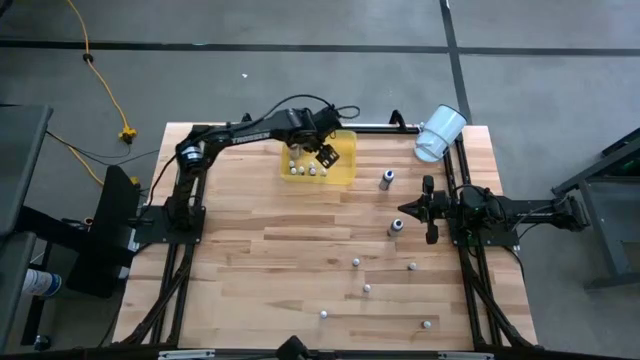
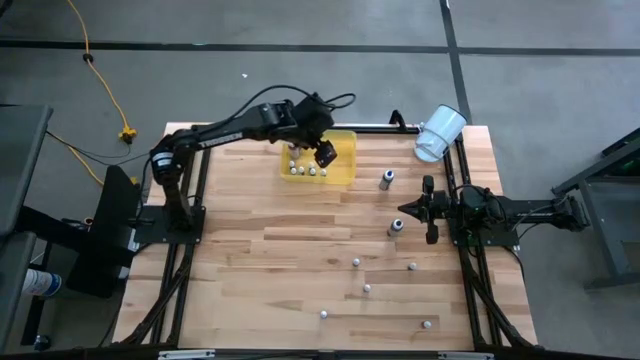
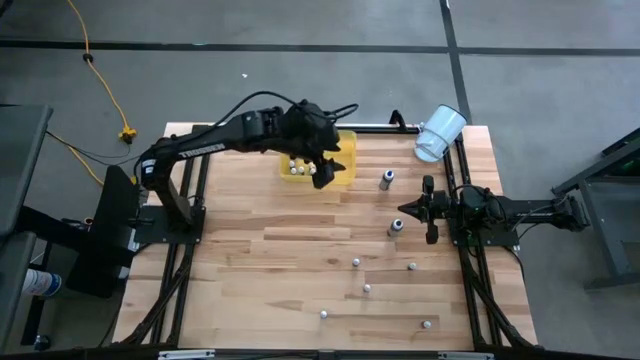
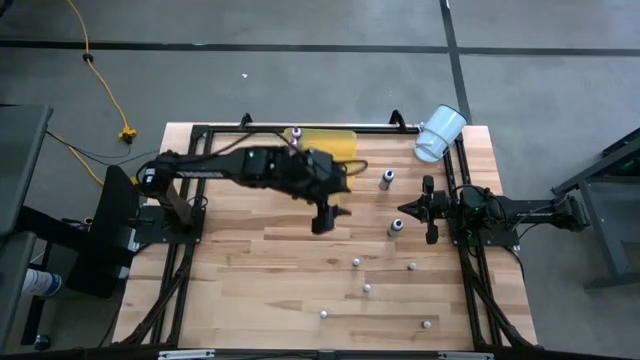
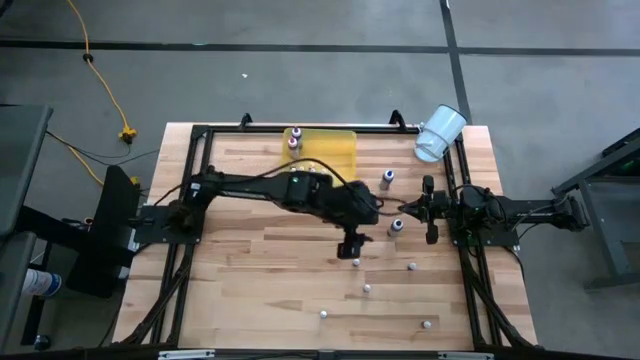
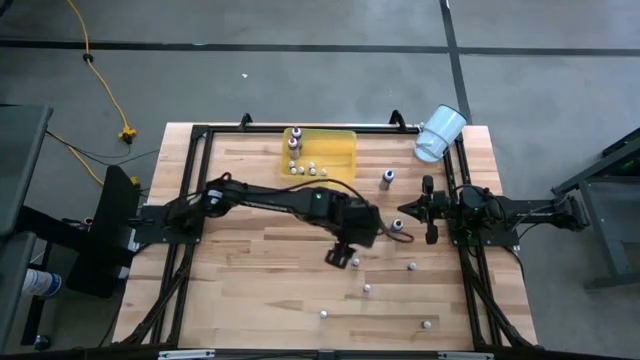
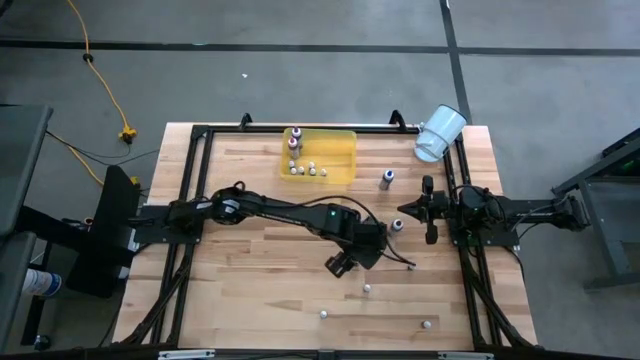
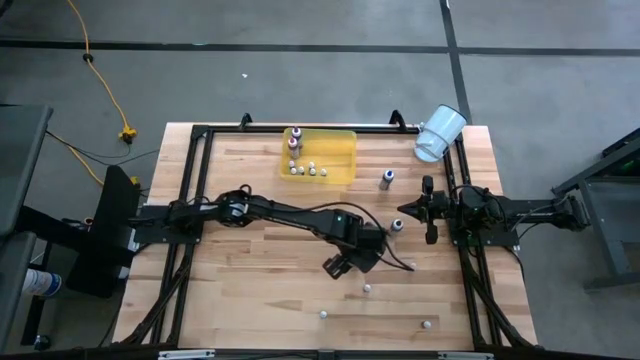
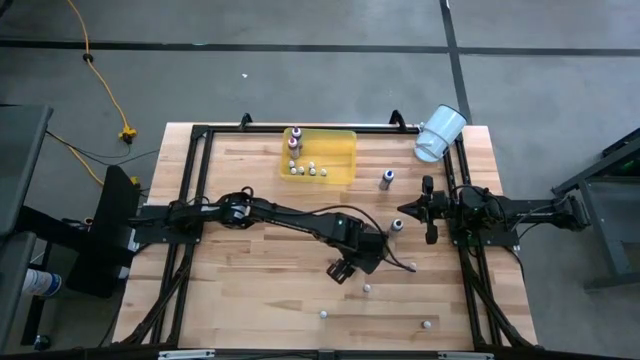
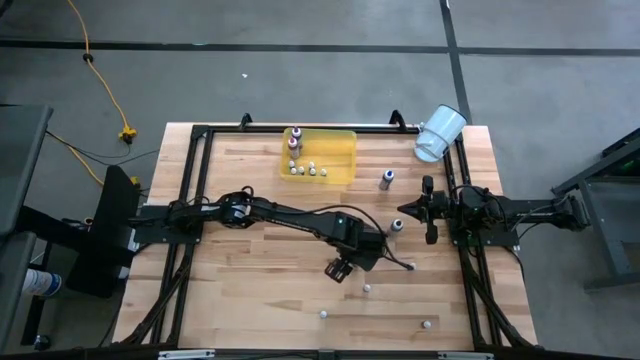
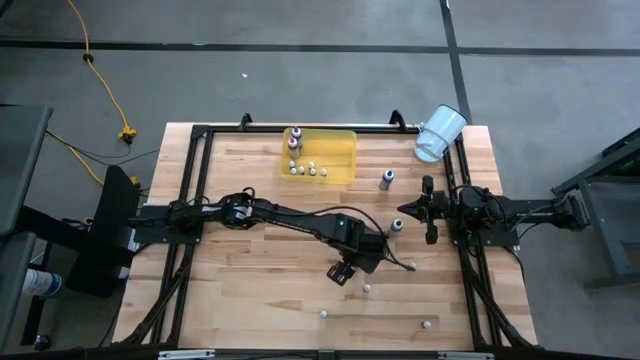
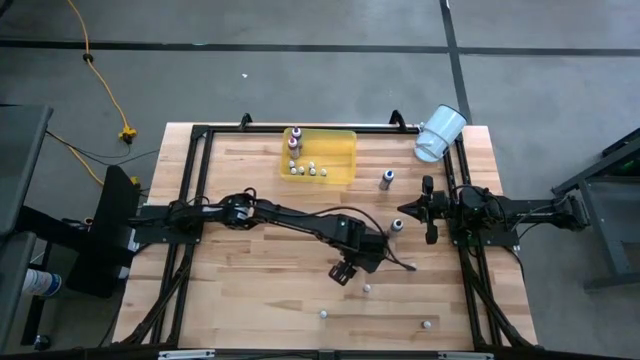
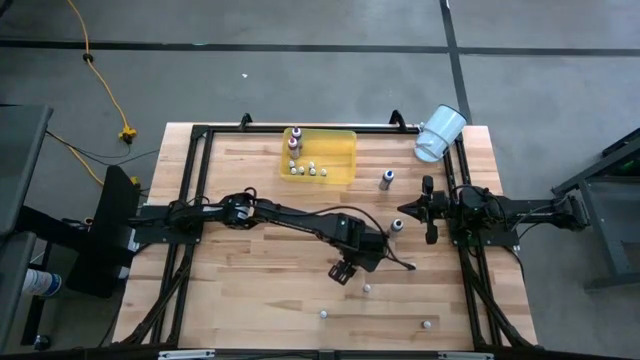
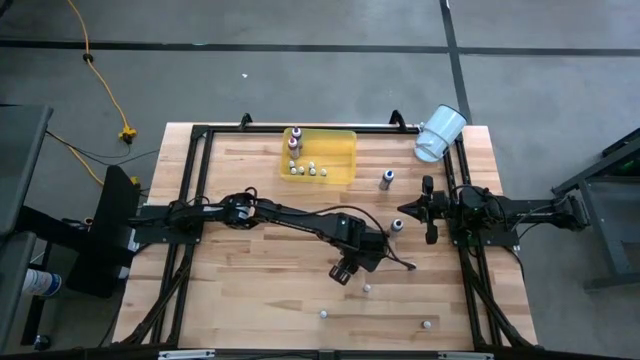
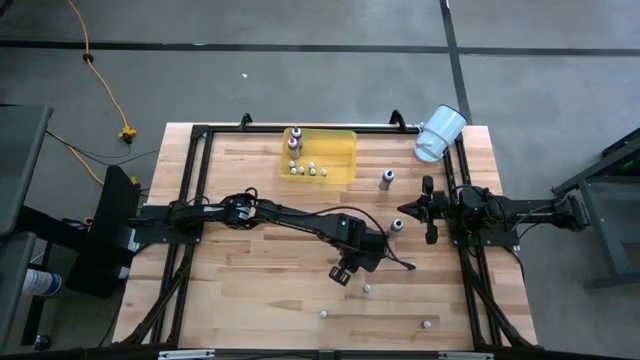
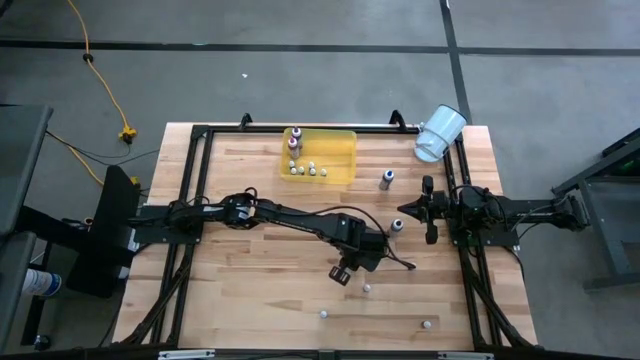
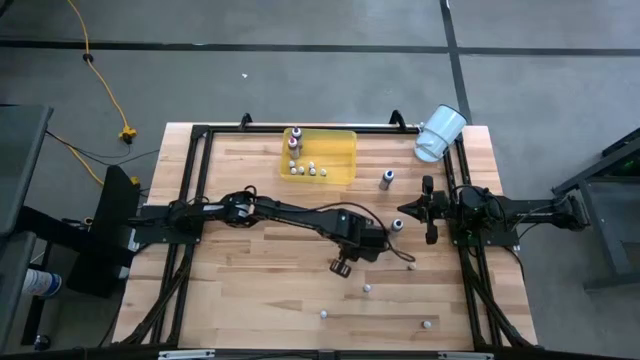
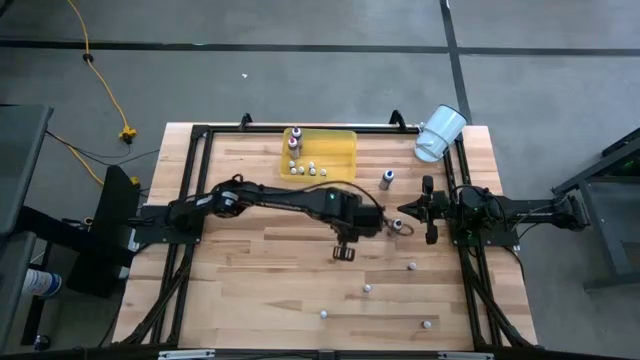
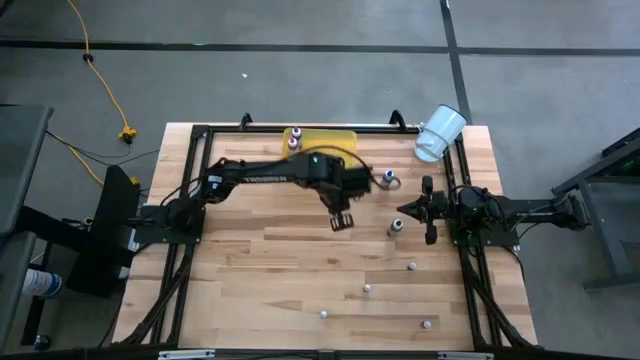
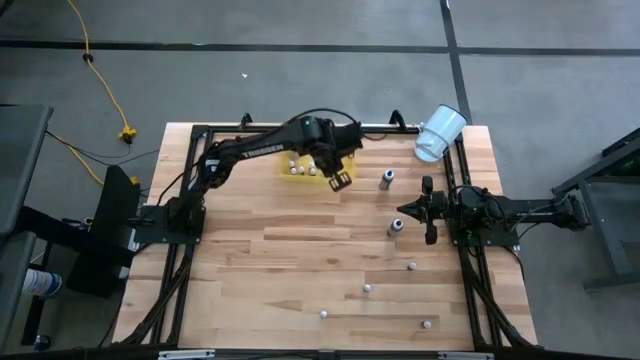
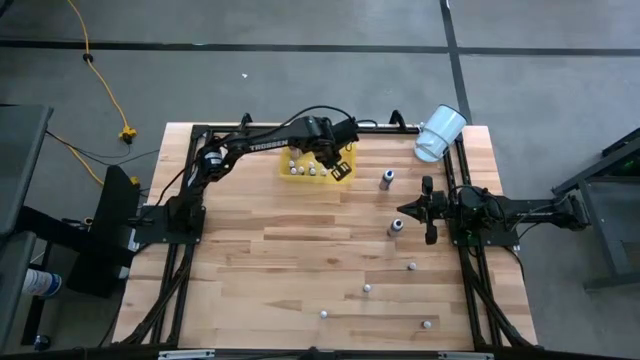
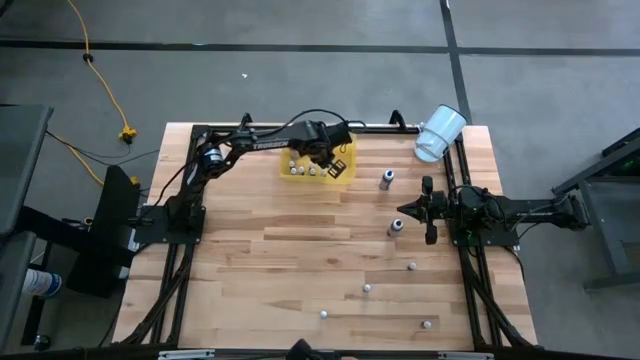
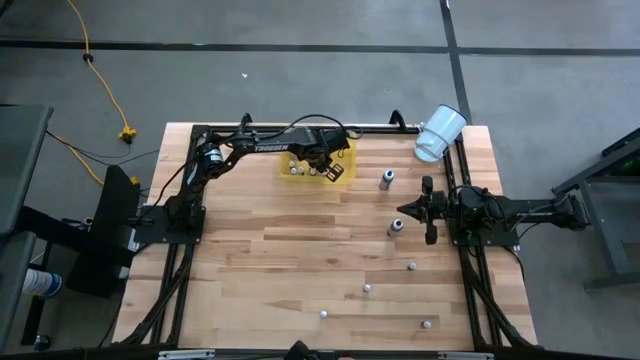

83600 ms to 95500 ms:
Task: Pick & Place food coloring
Put the small blue food coloring into the yellow container

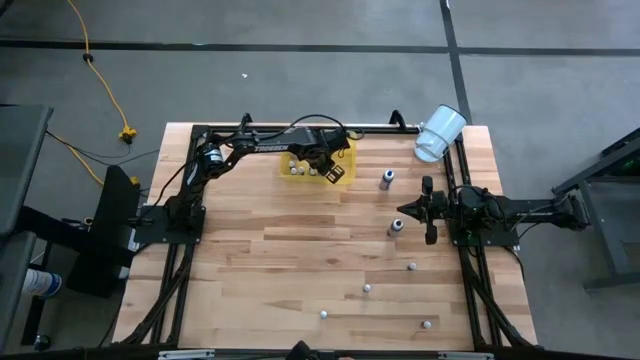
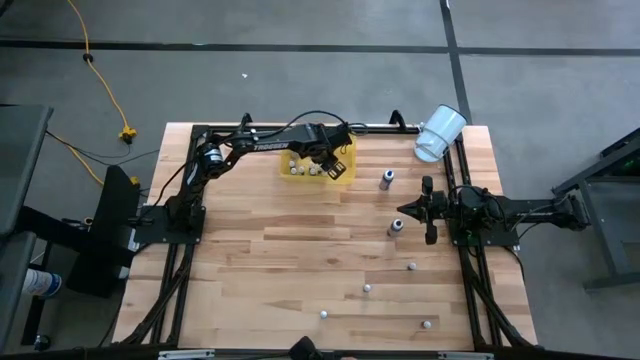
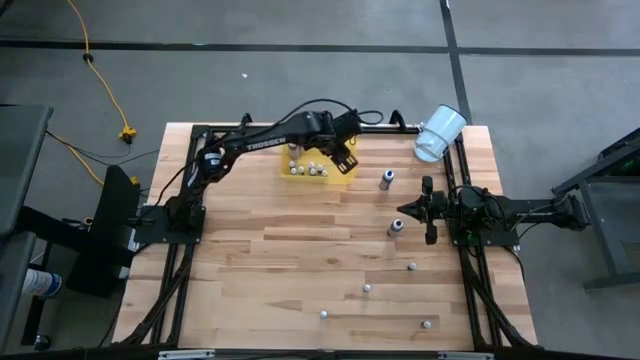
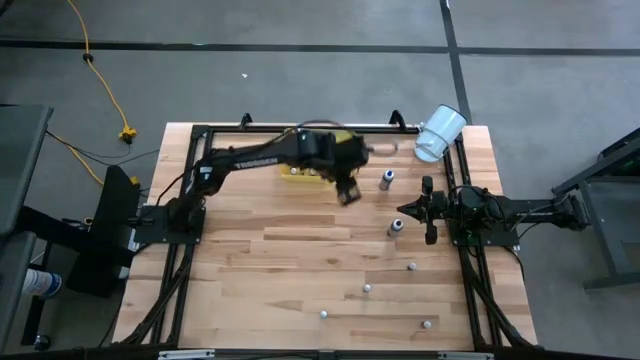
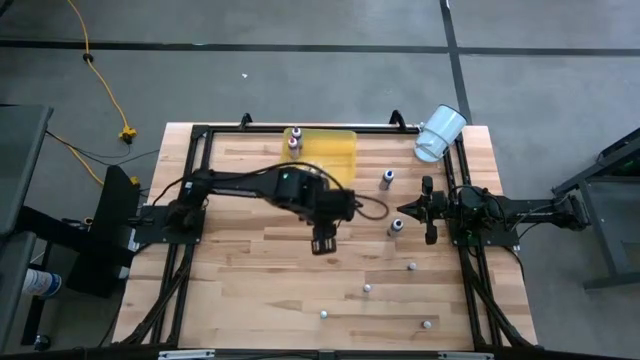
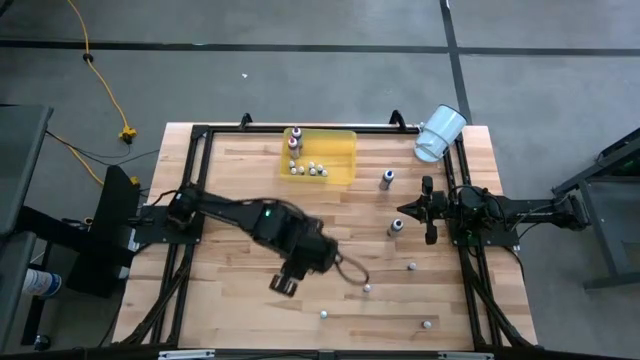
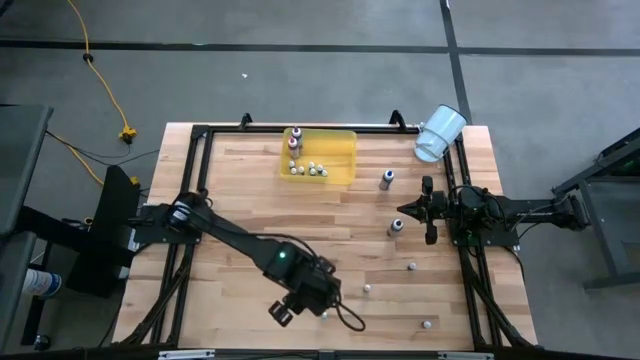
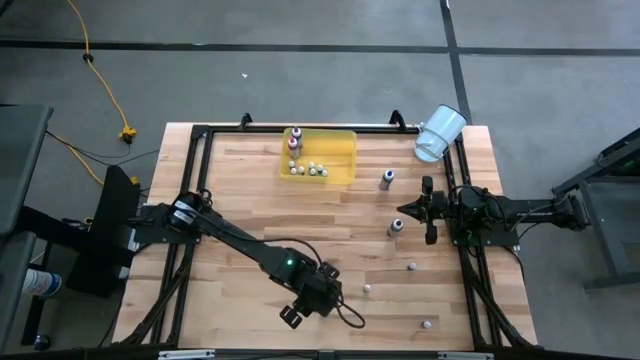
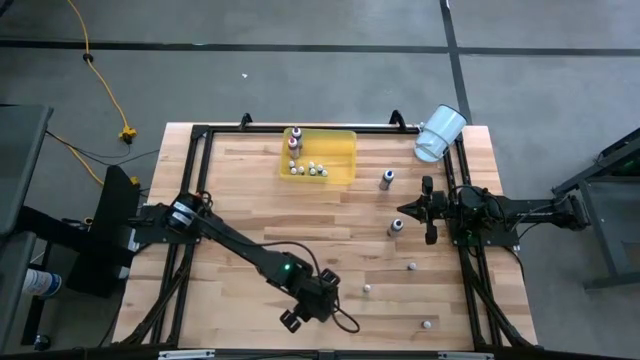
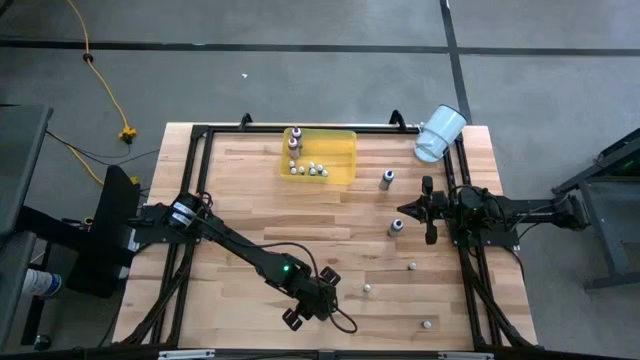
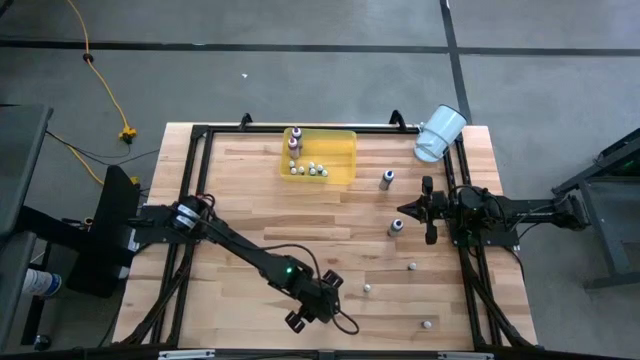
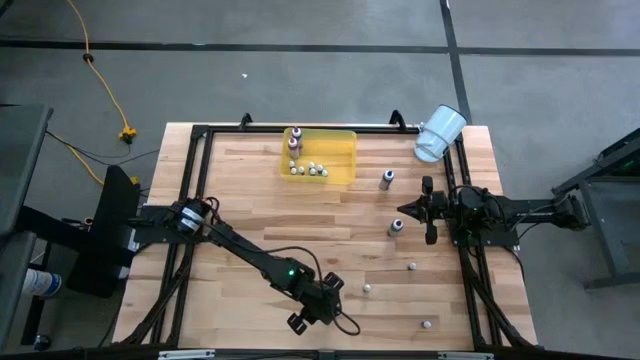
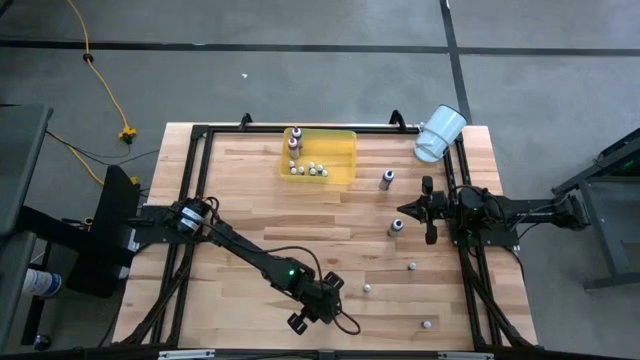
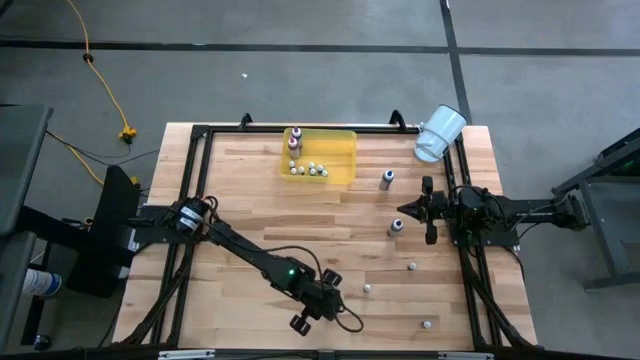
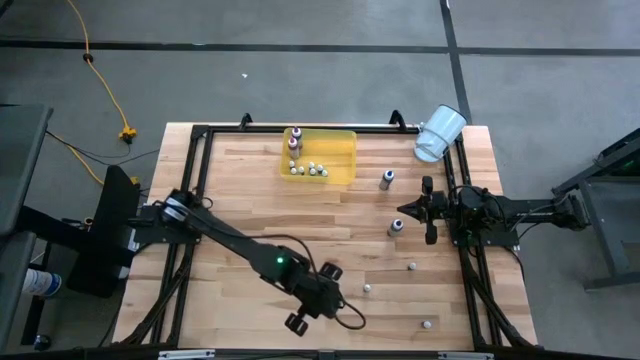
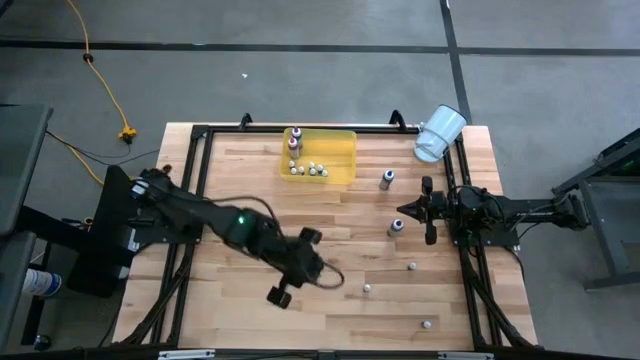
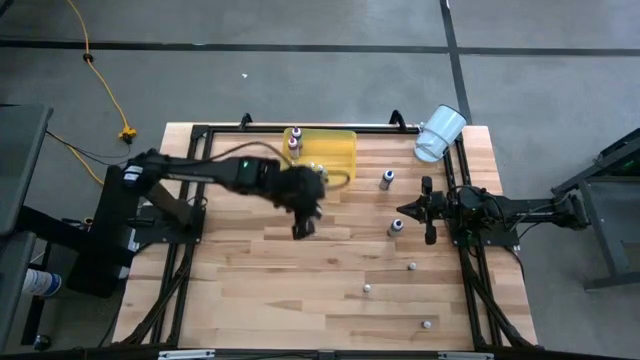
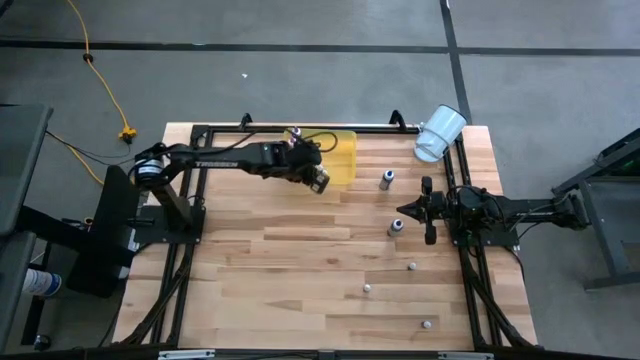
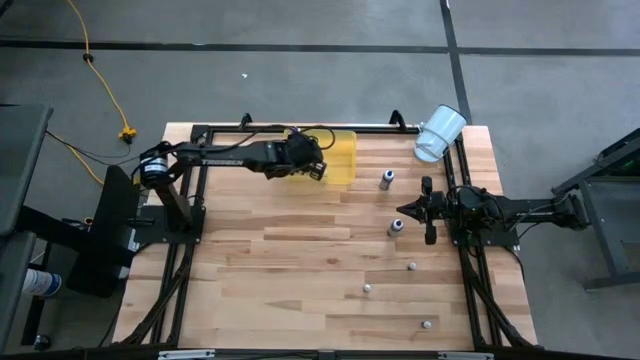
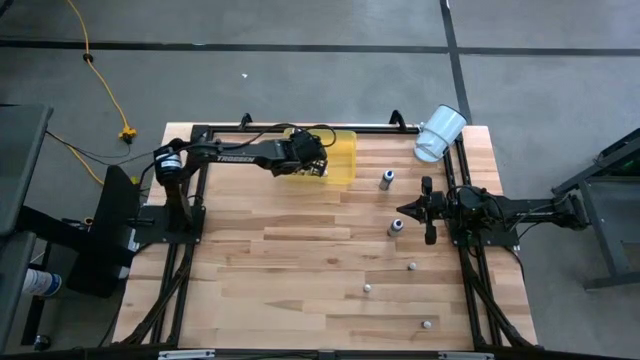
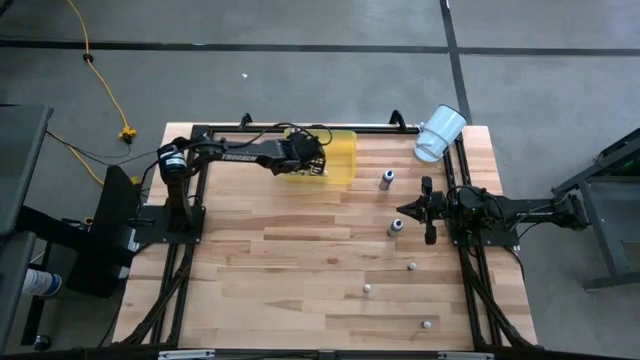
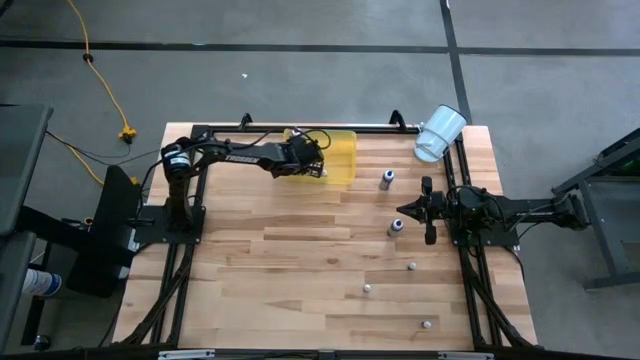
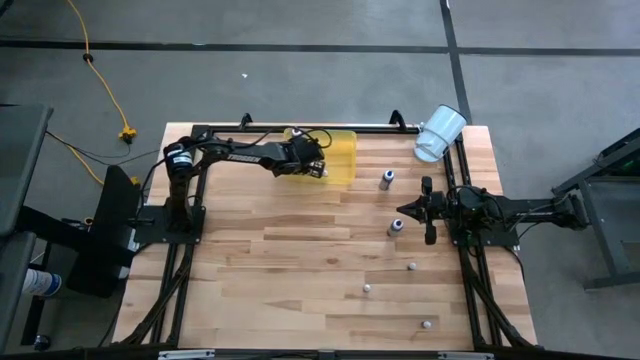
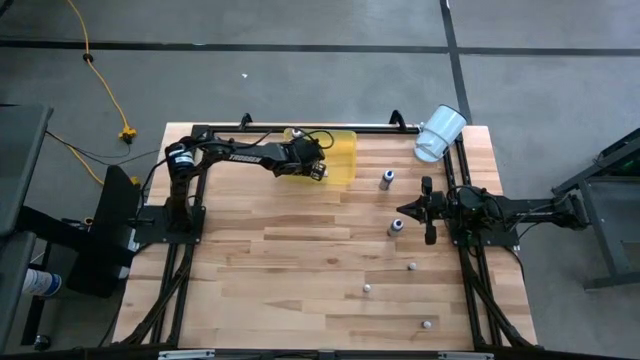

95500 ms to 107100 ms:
Put the small violet food coloring into the yellow container
